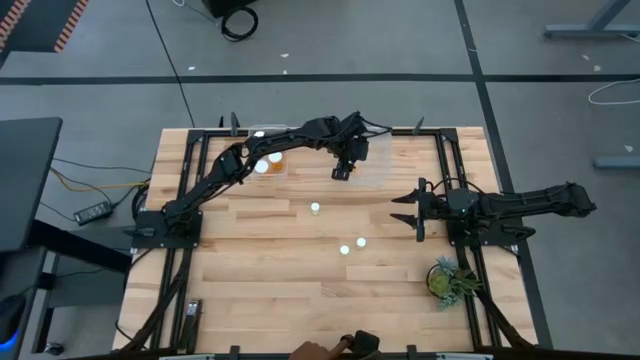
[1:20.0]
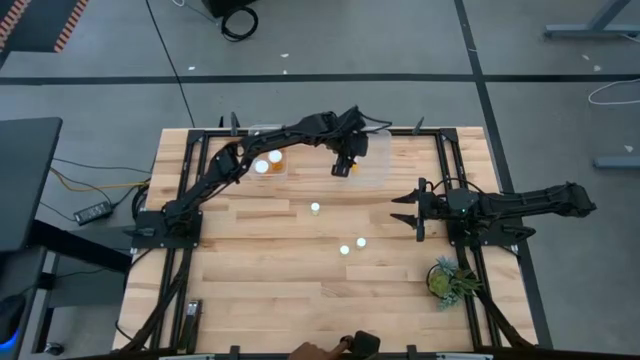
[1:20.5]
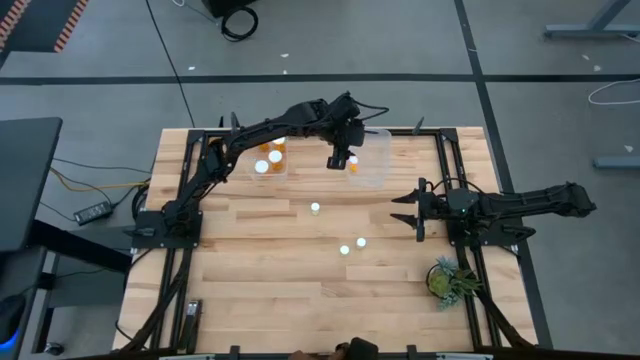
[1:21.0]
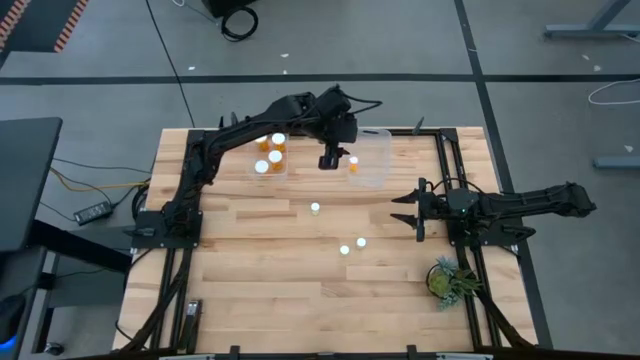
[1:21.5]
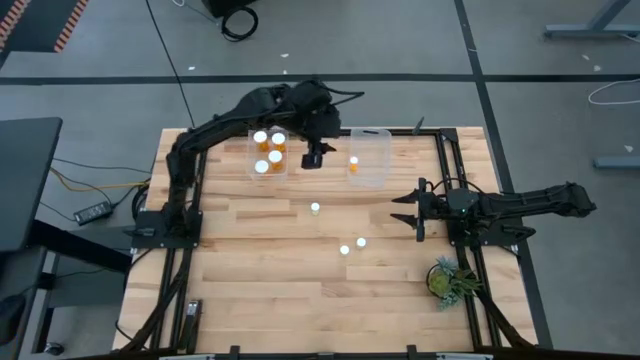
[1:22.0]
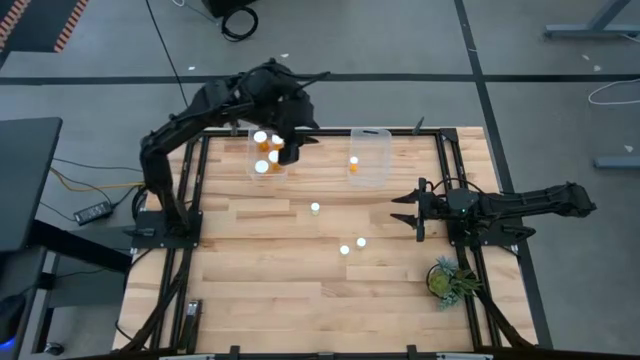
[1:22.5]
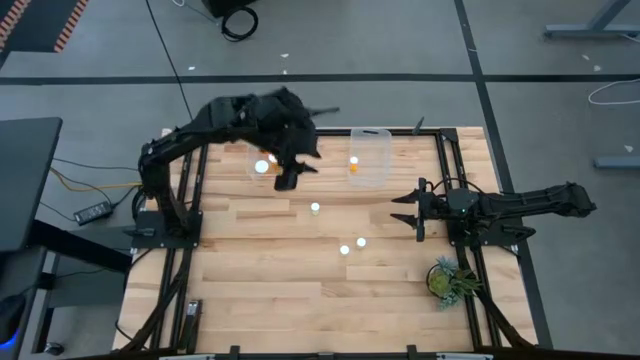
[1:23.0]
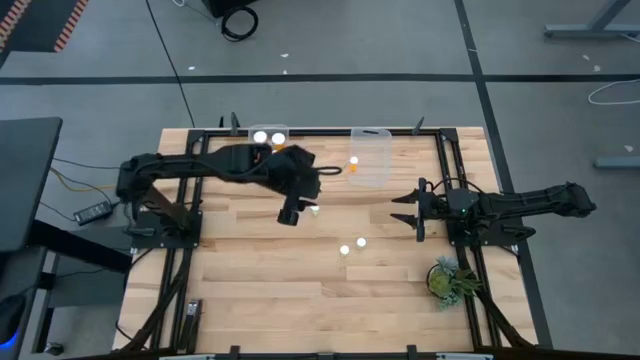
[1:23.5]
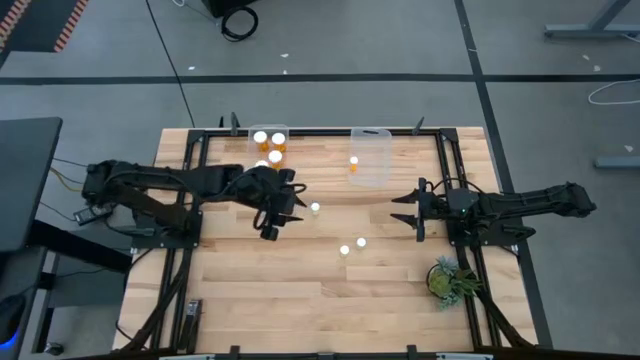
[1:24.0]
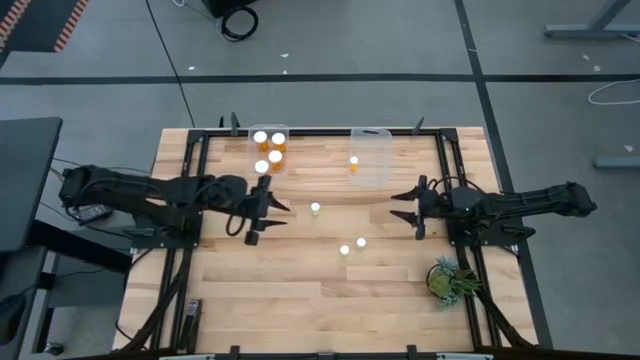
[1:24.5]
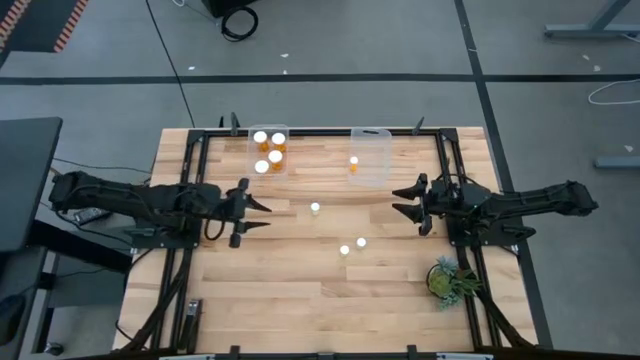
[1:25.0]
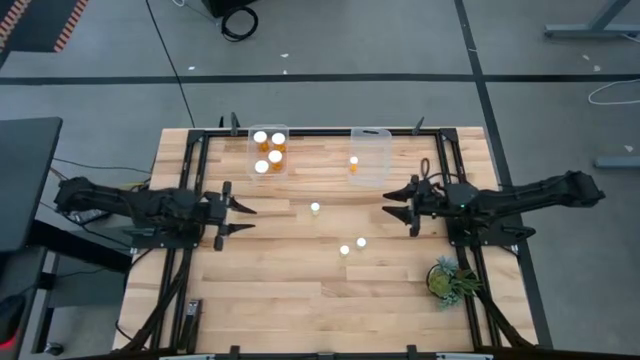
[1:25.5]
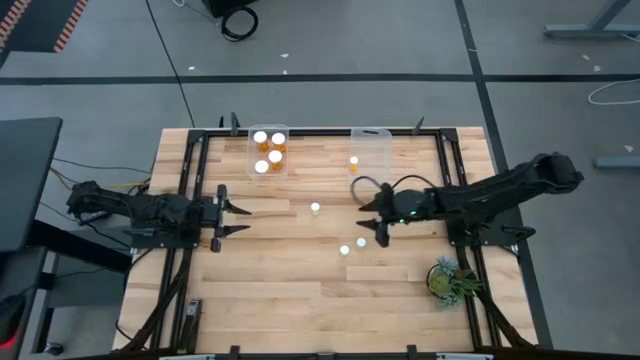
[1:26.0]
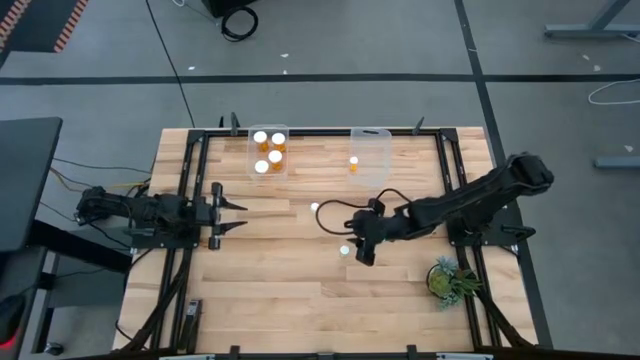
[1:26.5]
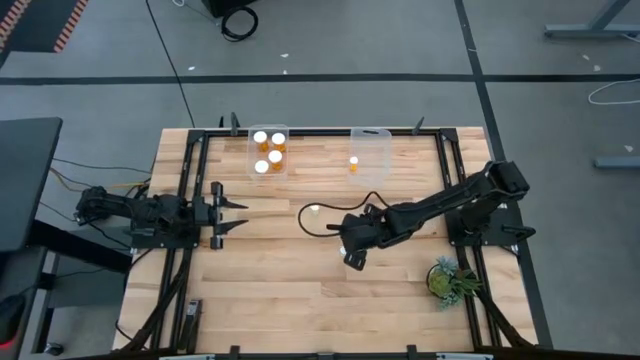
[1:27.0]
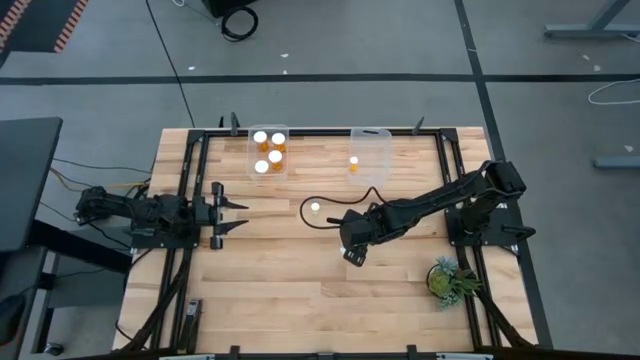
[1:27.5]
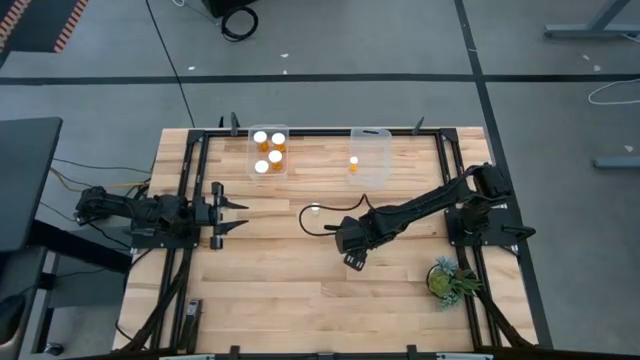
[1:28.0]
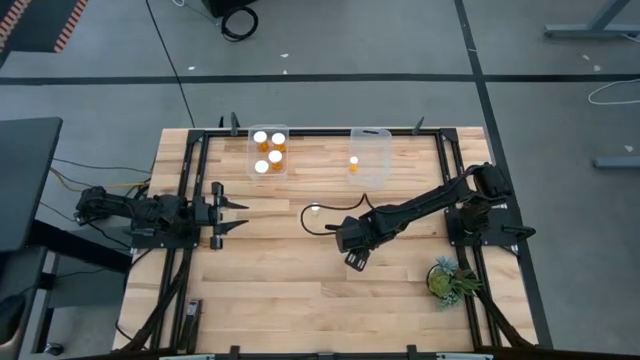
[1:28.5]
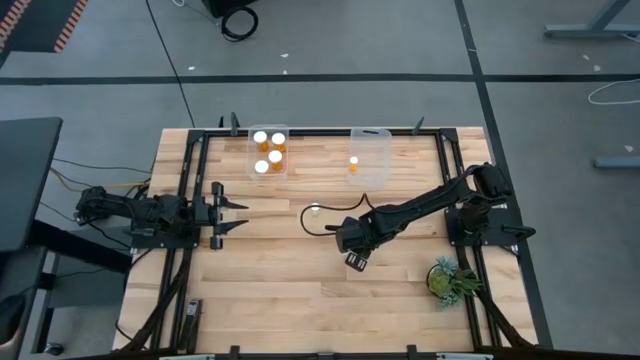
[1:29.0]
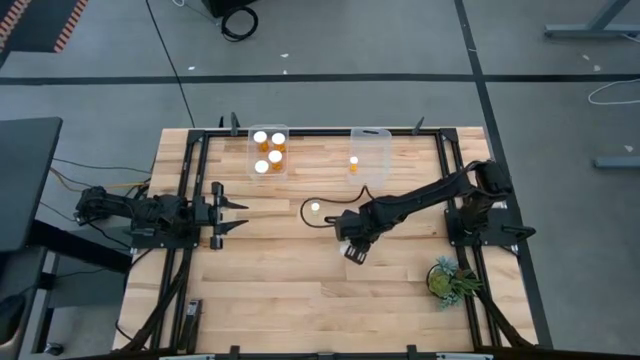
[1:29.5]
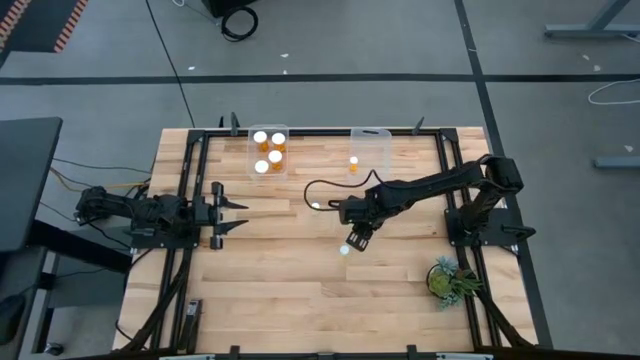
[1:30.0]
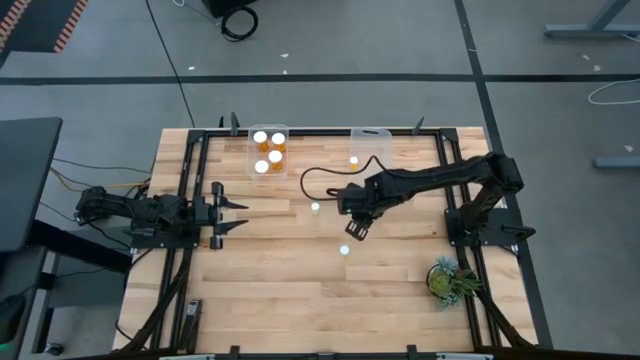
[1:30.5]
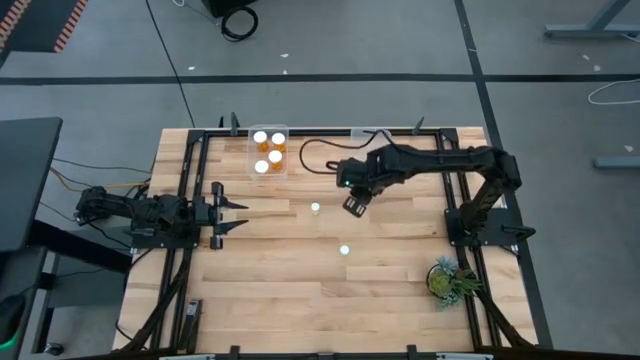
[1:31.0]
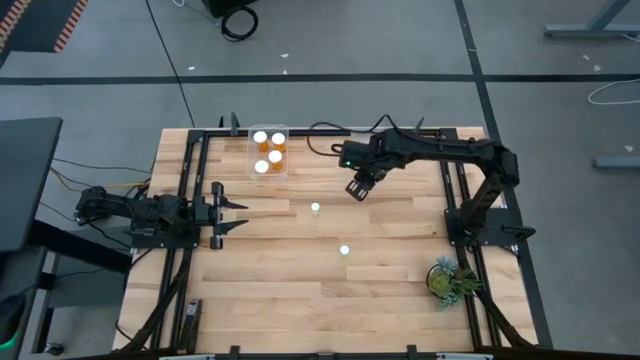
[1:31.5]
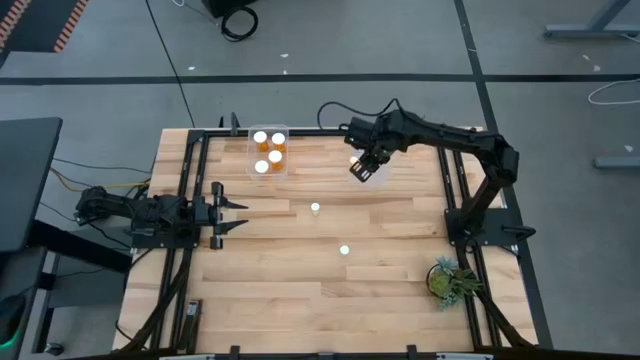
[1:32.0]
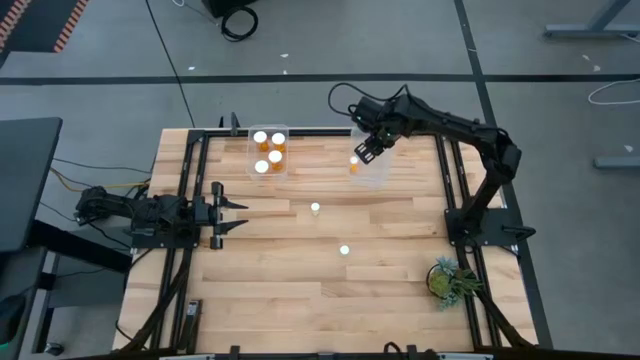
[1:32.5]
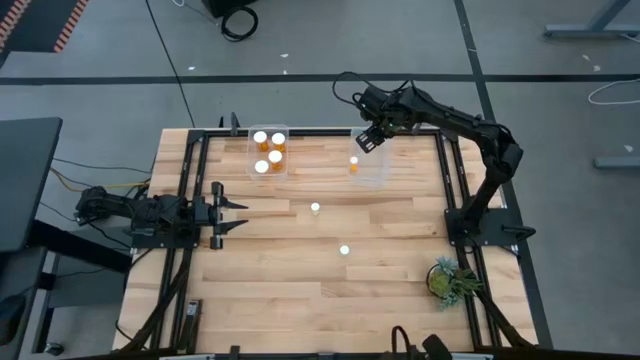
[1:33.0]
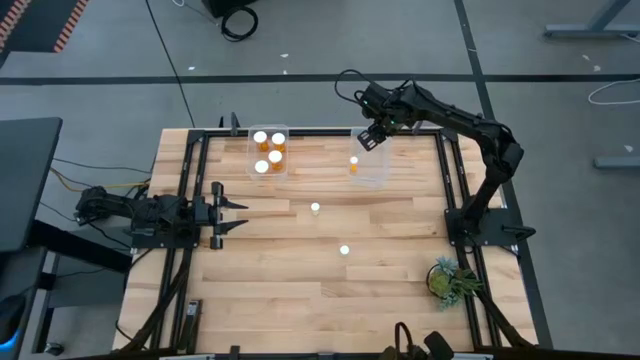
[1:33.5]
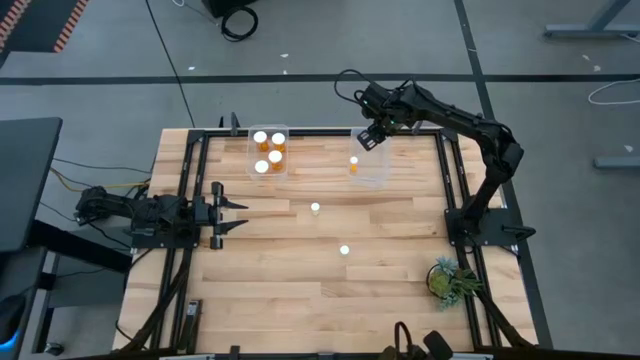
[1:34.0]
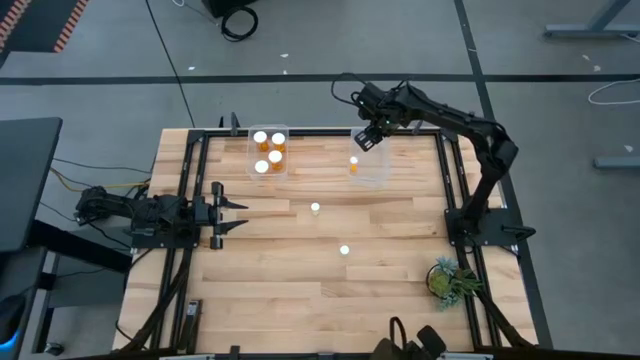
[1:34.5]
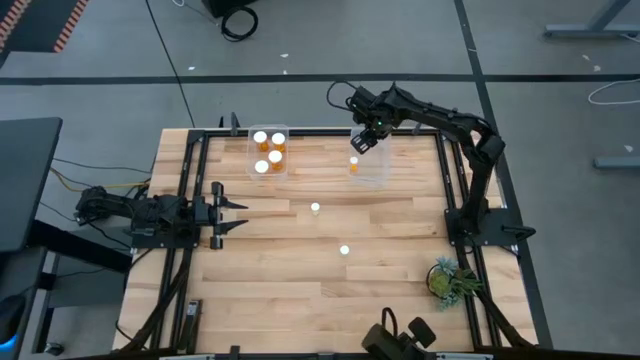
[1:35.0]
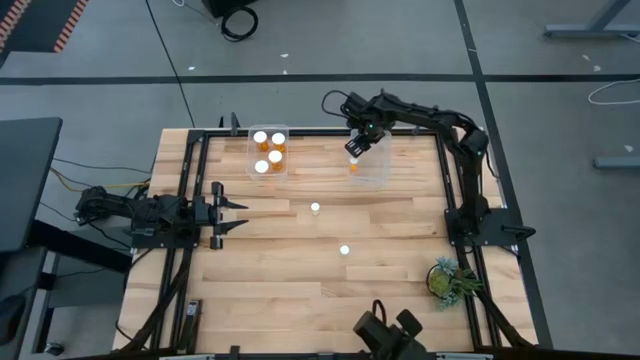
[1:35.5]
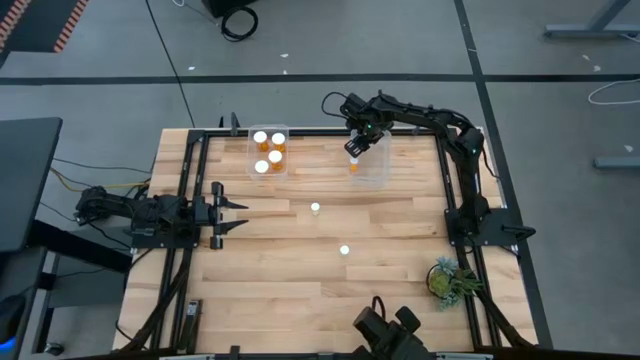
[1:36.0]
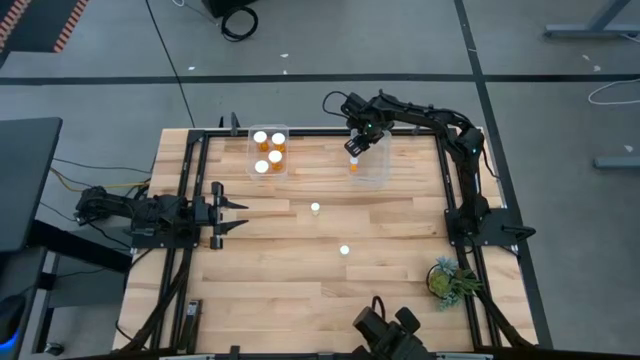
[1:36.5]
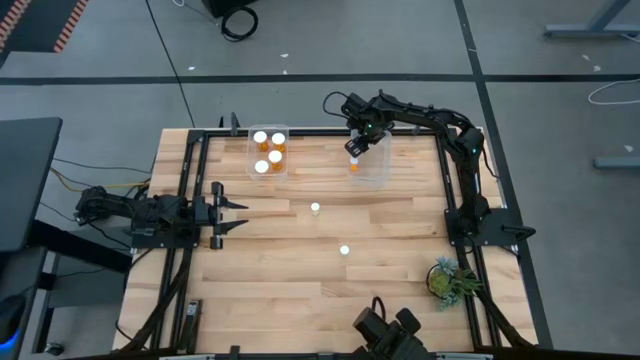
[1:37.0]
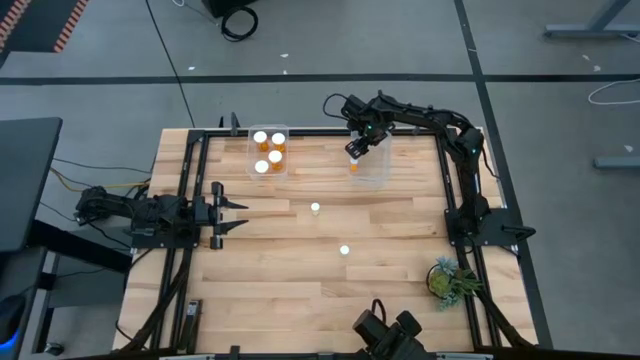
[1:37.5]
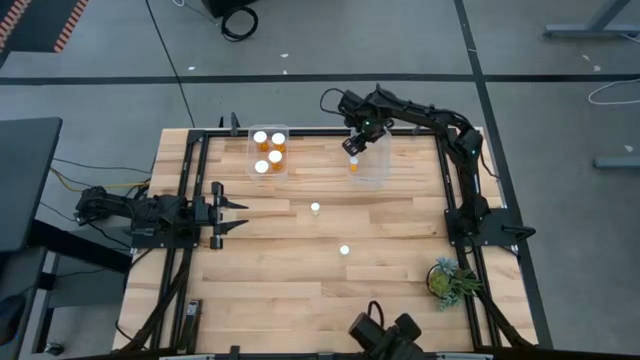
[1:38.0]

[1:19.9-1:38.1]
Task: Pick and place medicine bottles into bin by pill shape (circle, oval)
Put the yellow tablet bottle into the right transparent bin

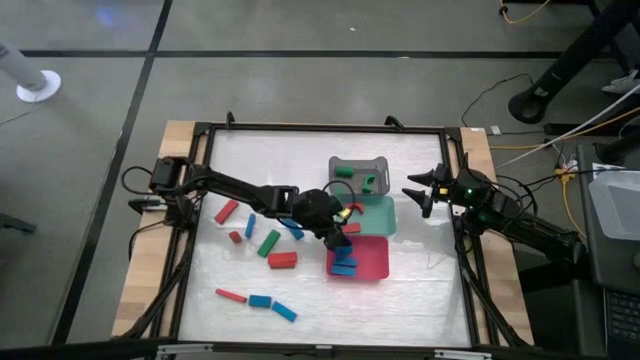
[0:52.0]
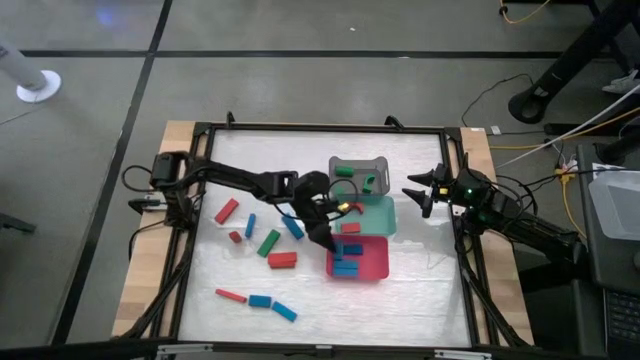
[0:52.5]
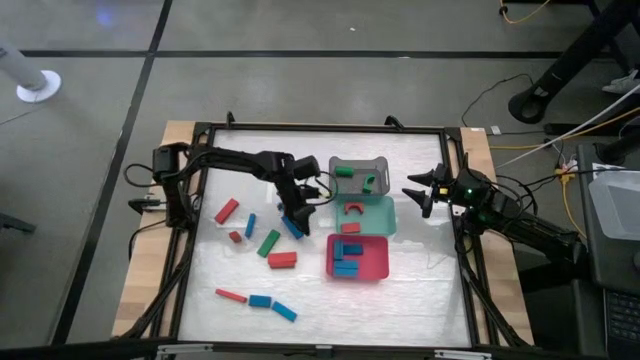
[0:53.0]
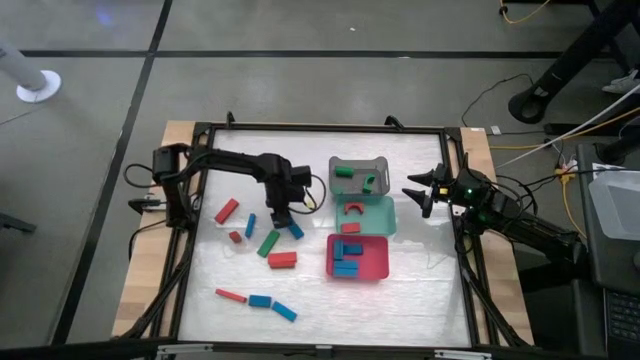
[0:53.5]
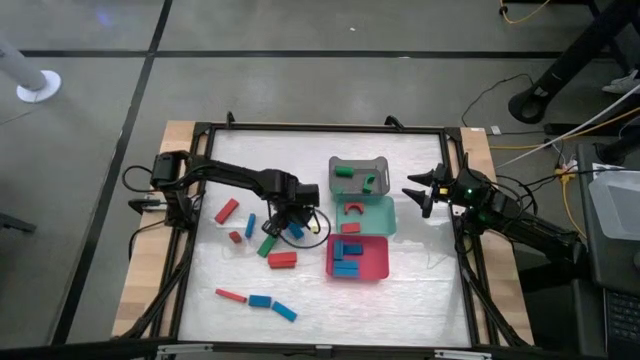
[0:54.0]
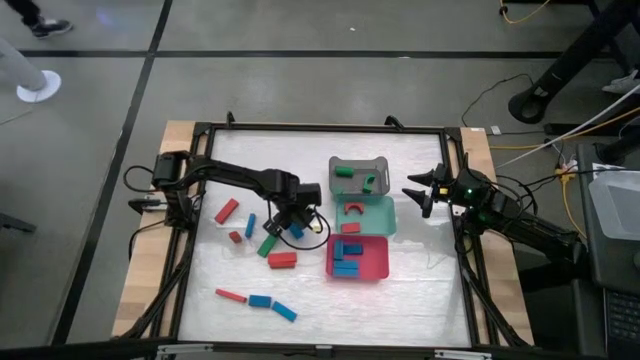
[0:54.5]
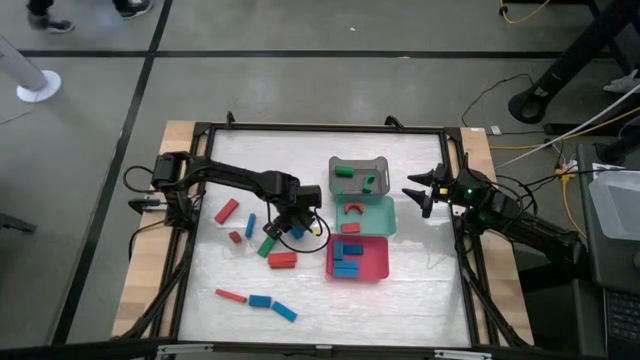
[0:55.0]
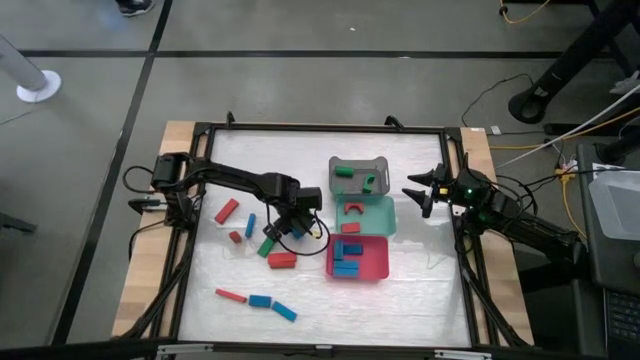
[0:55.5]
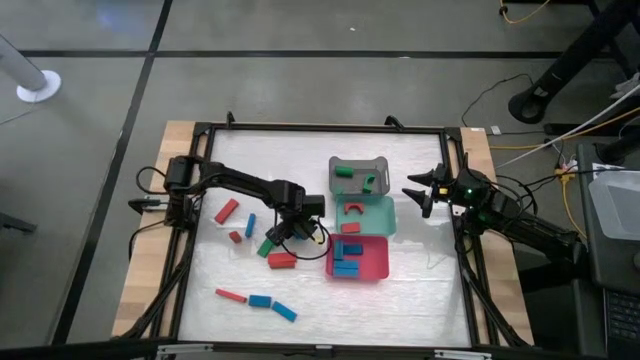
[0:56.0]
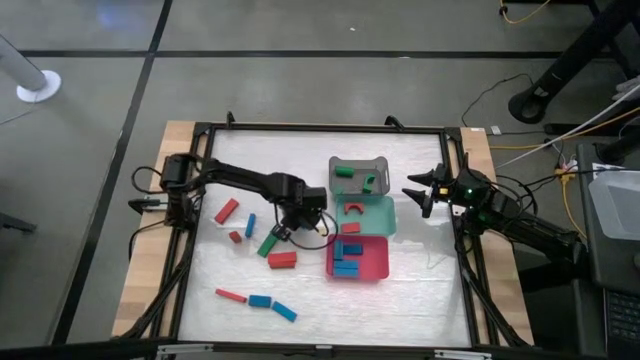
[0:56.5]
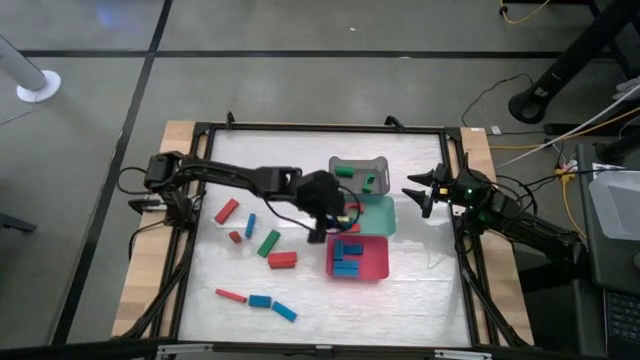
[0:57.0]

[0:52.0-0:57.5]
Task: Sort blocks
Put the blue block into the red bin
